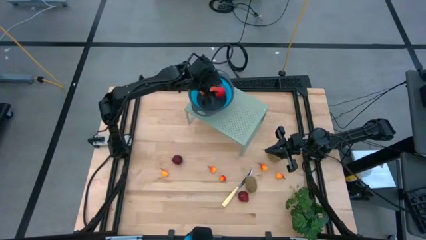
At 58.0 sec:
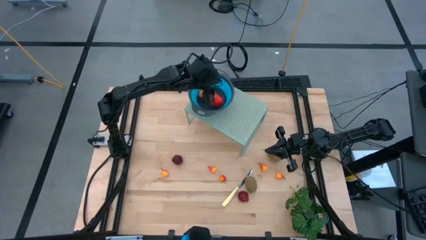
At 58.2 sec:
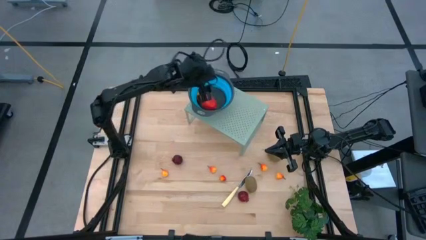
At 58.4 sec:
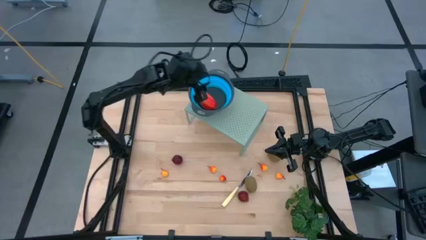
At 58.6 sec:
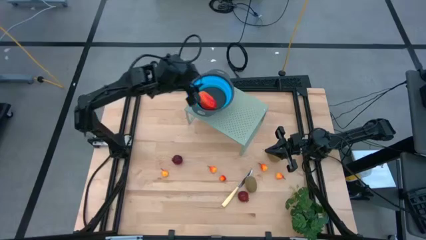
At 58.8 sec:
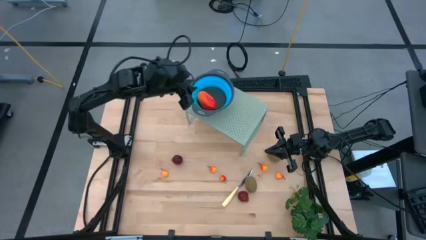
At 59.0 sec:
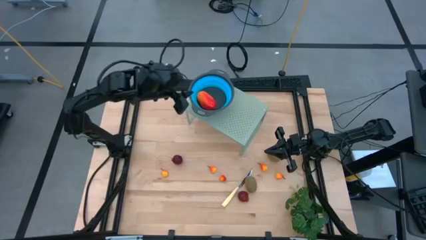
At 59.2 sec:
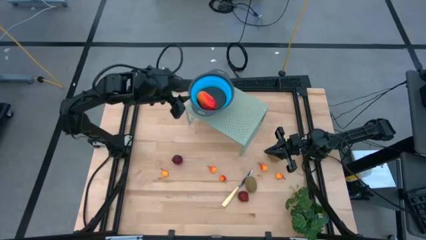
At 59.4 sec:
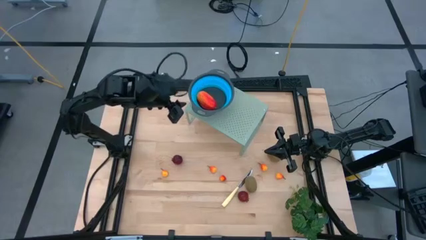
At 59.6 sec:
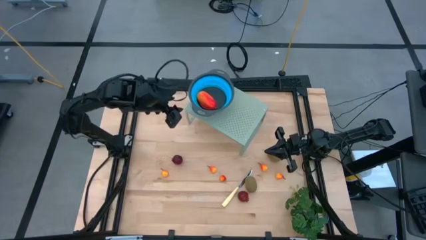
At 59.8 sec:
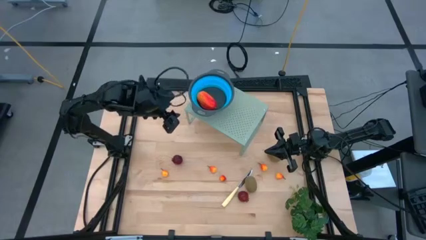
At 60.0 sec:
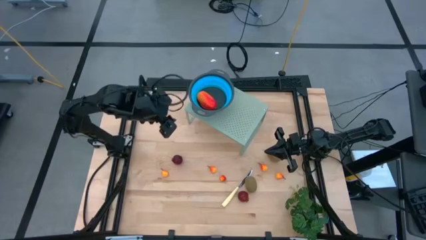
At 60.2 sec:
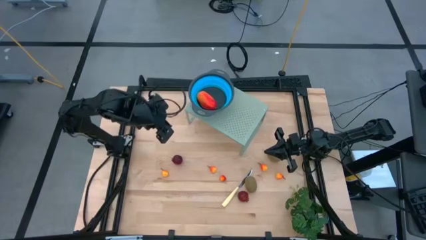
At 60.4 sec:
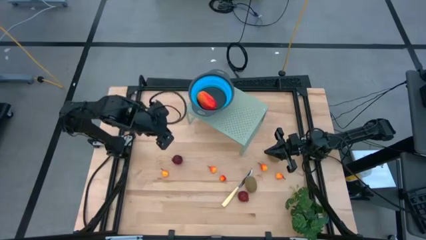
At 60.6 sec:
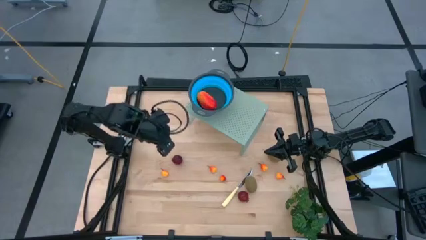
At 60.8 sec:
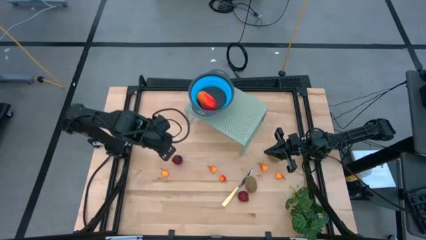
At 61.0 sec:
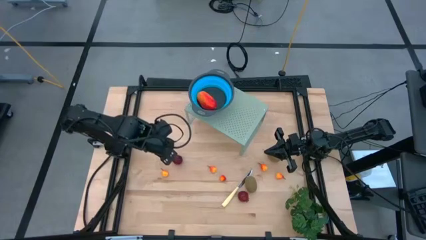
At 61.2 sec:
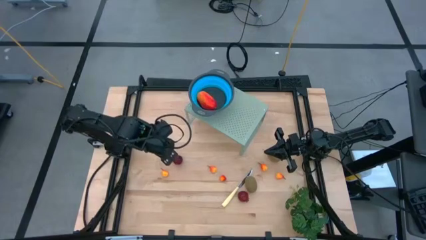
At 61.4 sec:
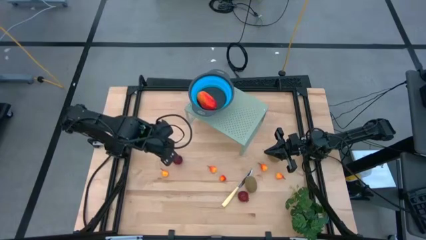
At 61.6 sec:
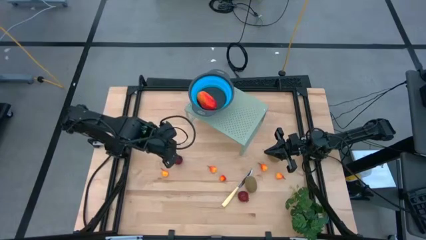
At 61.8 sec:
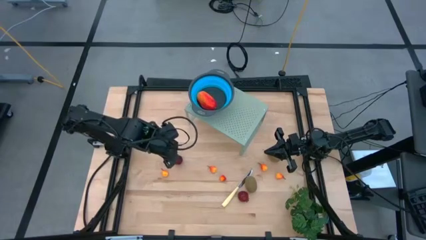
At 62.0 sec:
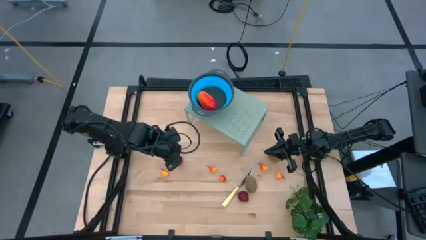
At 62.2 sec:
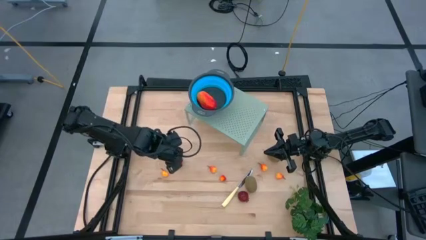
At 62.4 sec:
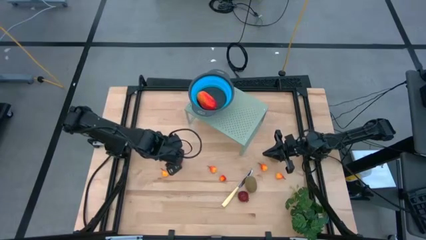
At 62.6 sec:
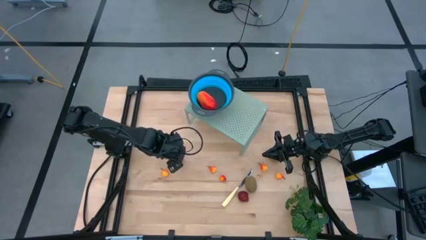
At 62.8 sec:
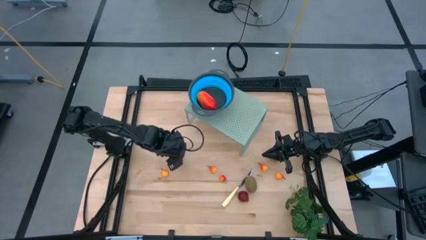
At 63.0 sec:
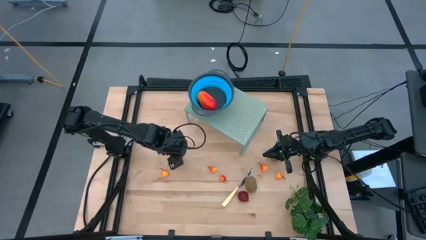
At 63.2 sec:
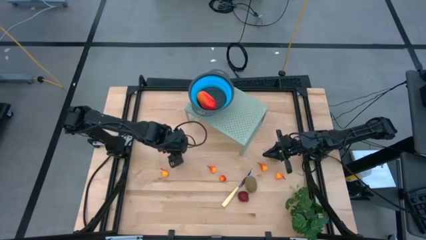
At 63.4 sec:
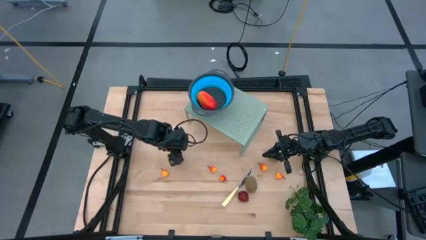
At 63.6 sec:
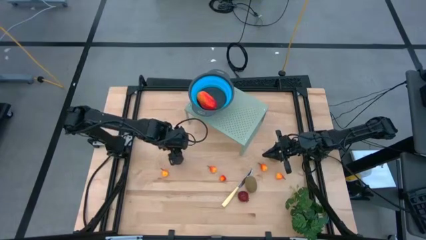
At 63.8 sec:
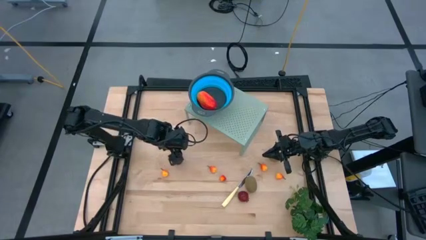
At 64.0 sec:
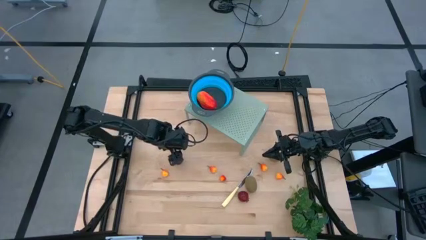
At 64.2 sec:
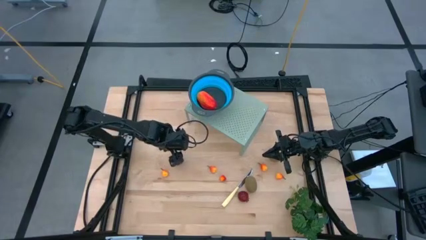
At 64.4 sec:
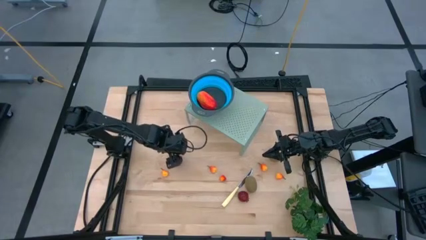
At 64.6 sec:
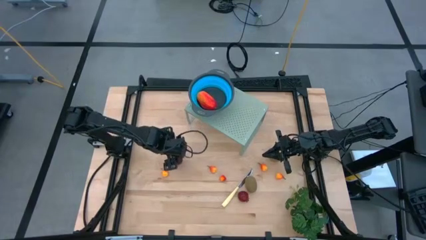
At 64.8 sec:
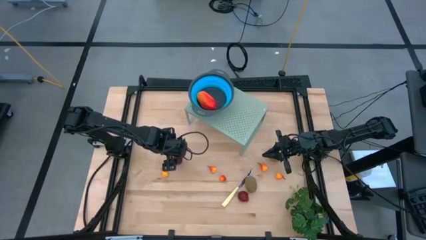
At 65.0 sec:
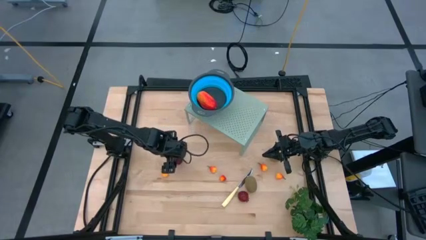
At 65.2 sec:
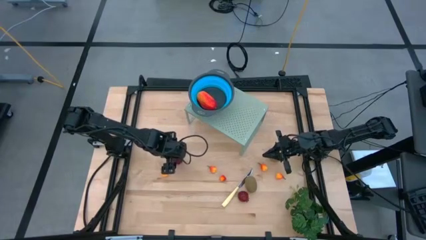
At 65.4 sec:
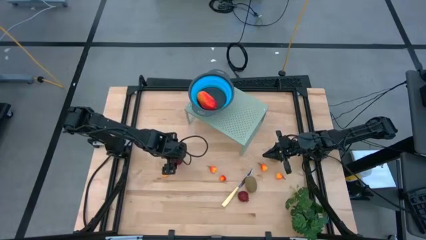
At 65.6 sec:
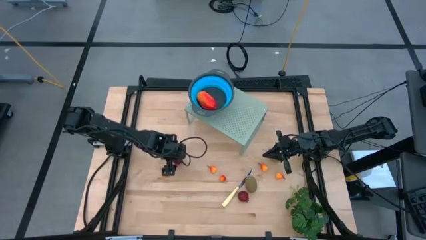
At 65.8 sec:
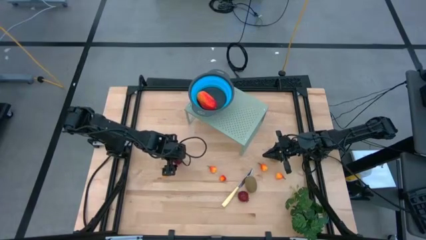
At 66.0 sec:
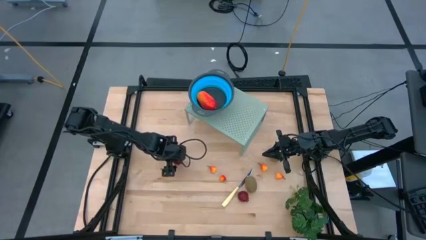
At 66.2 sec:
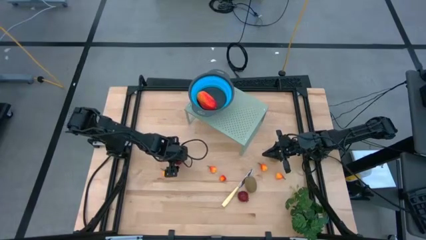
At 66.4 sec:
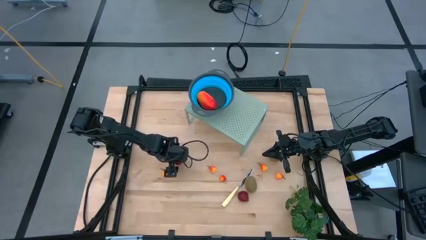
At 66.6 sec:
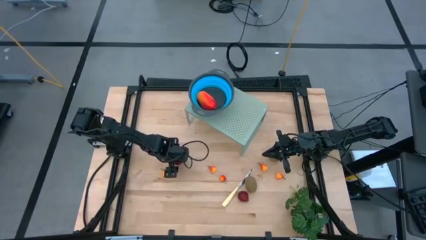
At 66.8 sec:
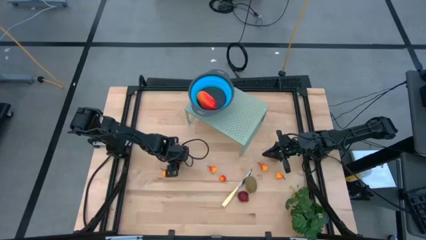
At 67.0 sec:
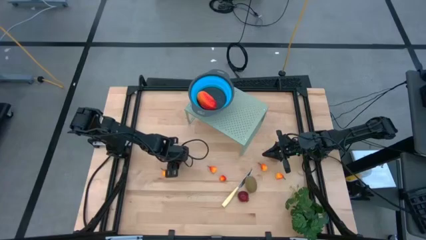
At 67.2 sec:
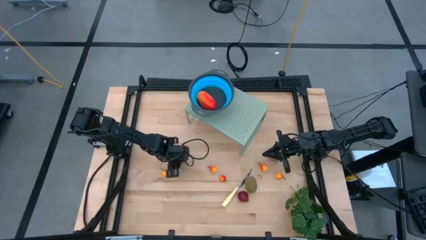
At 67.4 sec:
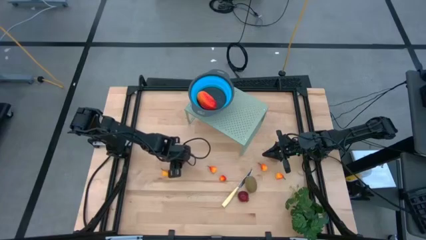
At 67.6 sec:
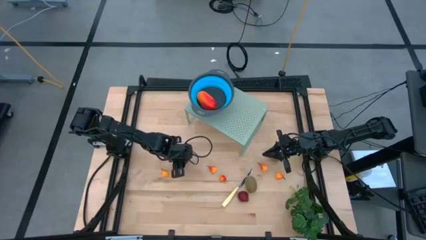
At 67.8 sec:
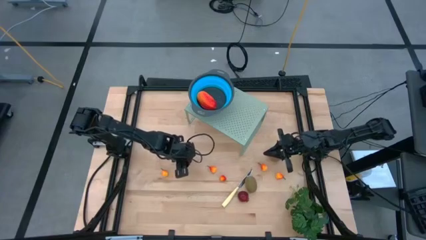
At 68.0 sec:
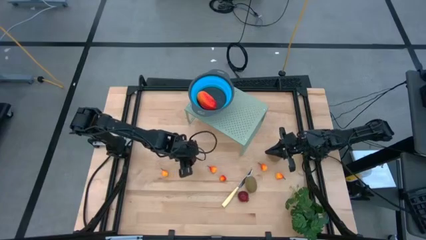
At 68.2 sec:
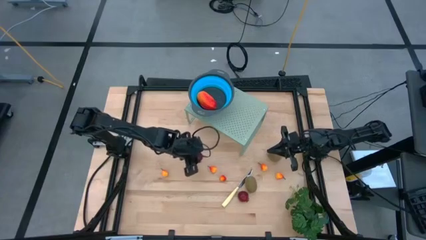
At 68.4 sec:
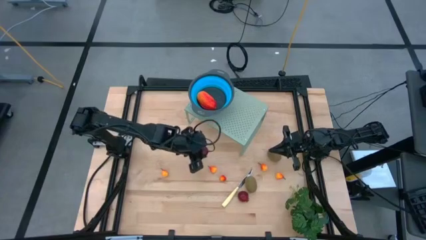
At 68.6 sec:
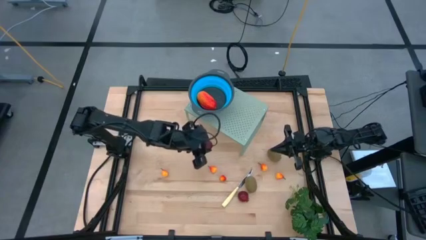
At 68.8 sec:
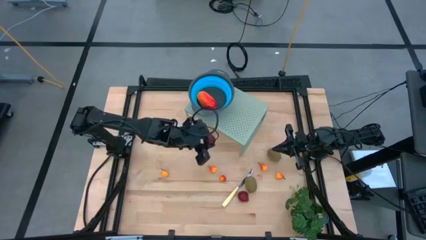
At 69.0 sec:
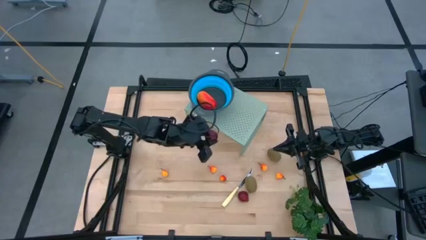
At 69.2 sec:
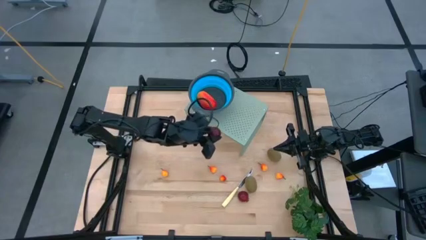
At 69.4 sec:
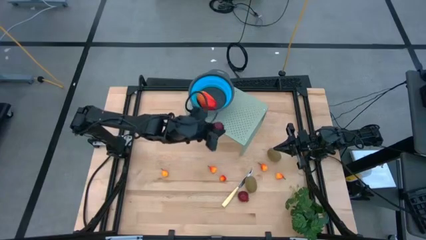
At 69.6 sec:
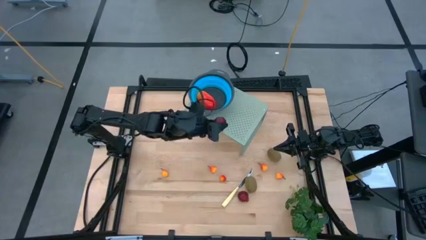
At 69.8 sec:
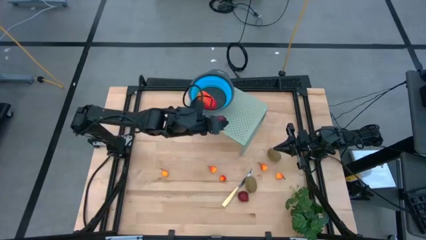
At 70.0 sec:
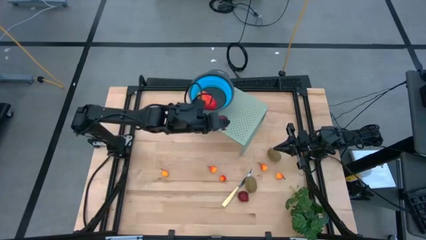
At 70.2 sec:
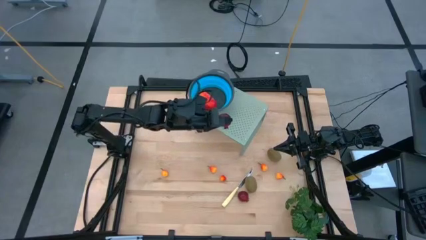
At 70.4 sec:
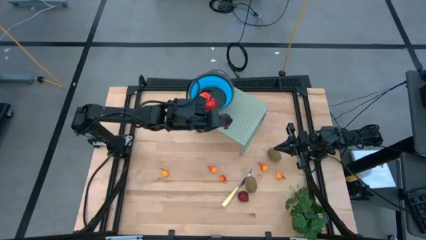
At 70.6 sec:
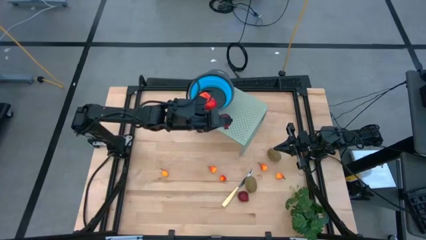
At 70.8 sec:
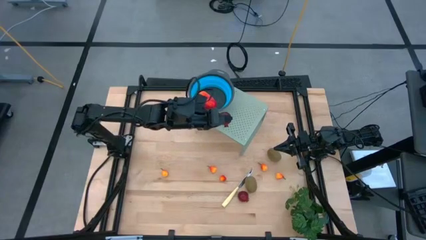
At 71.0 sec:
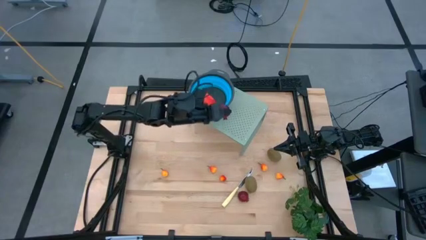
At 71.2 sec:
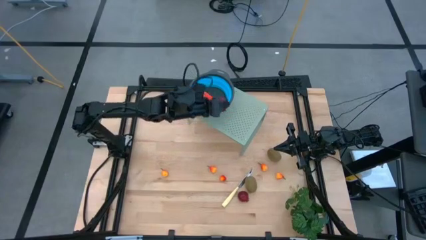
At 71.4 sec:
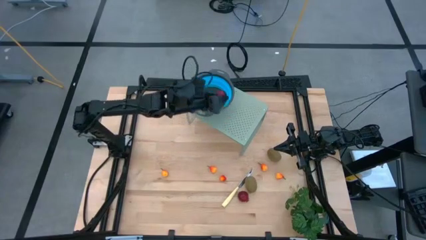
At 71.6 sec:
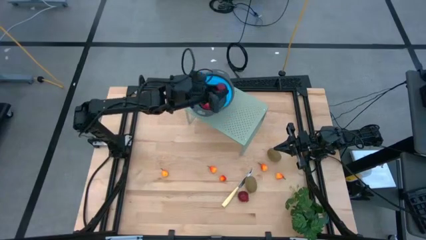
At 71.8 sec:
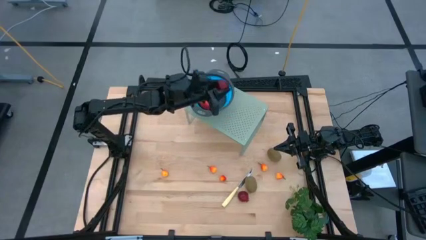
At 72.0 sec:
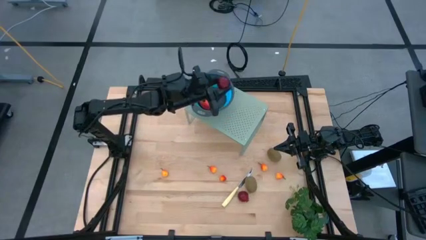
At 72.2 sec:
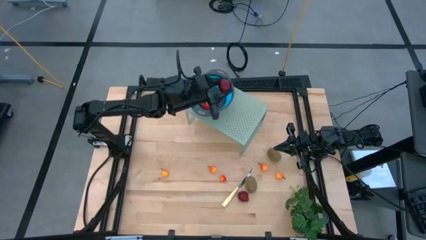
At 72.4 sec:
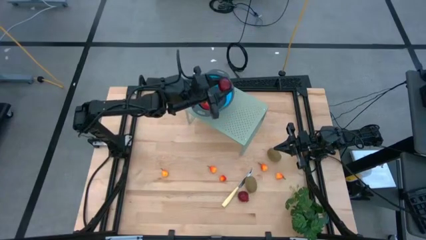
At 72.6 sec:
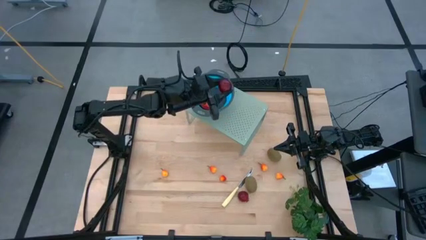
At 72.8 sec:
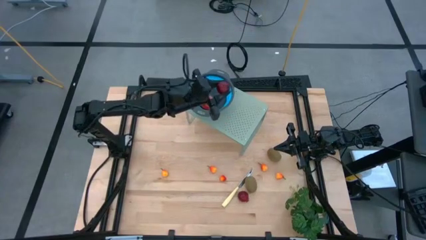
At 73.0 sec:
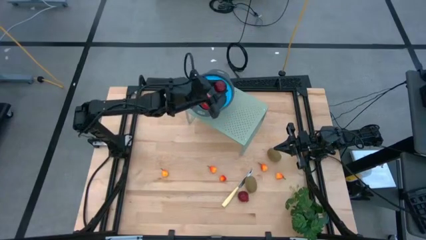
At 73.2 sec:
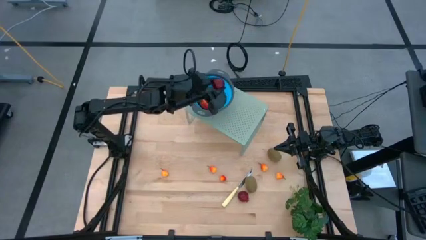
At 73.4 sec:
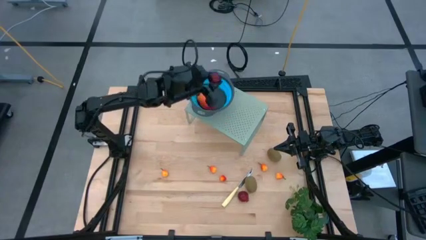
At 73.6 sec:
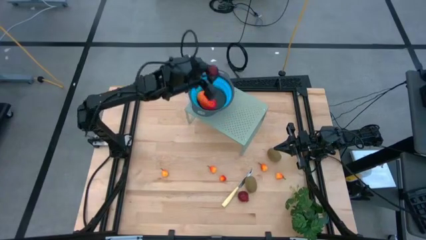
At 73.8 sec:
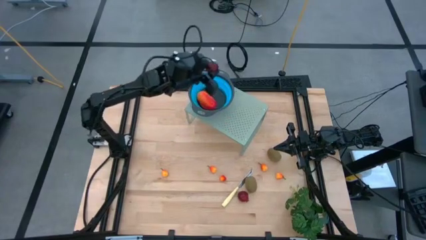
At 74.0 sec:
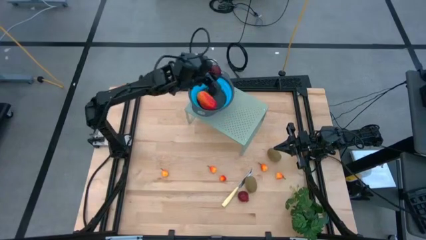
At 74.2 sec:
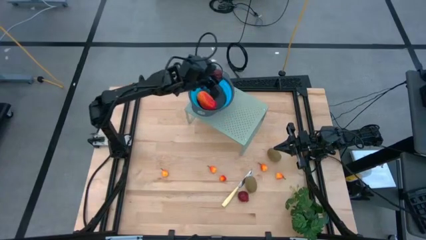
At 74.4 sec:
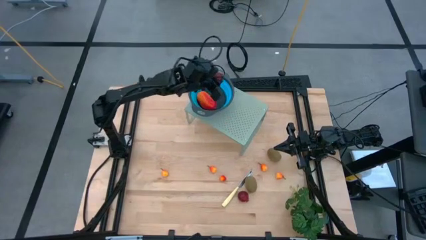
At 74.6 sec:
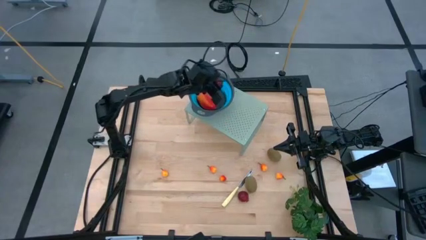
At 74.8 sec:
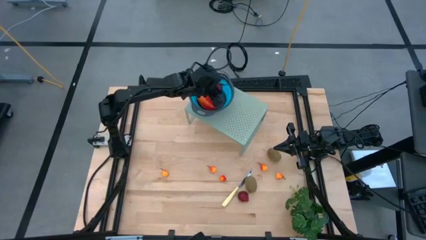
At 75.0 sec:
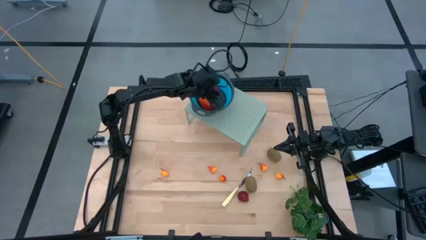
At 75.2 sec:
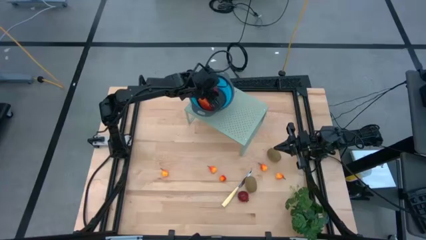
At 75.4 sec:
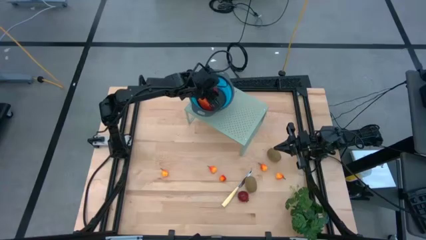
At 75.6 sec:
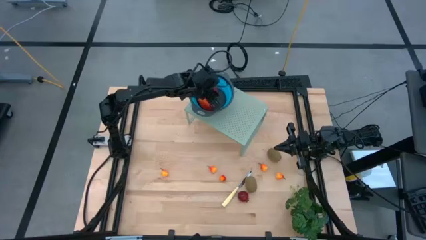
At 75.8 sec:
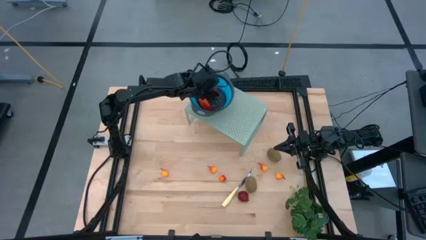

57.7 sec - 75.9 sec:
Task: Pick & Place Fruit
Put the pomegranate into the blue strainer bowl on the shelf
